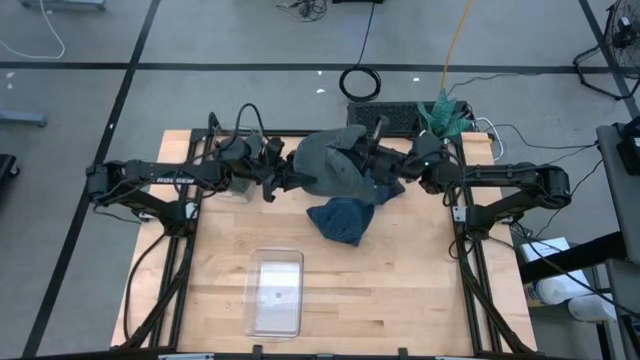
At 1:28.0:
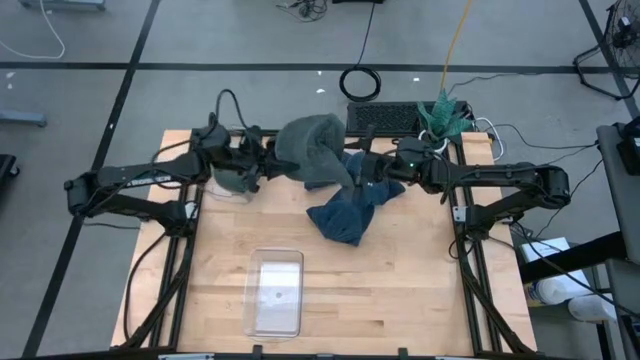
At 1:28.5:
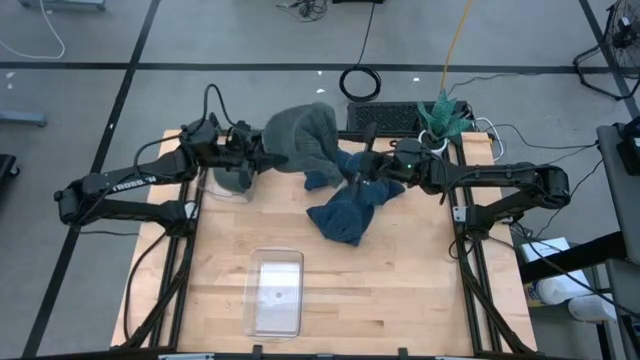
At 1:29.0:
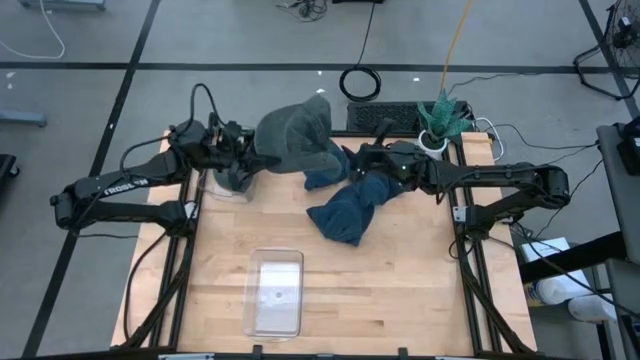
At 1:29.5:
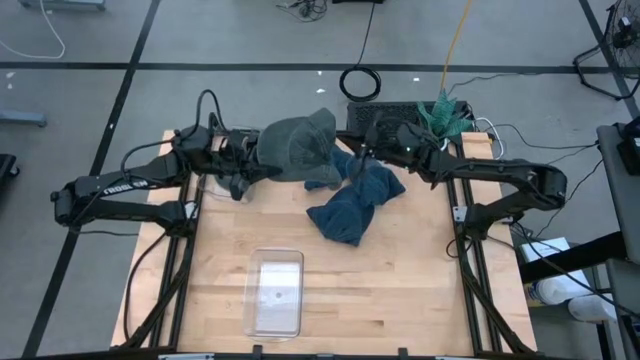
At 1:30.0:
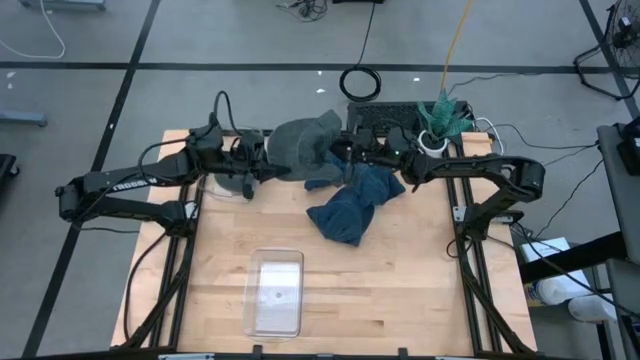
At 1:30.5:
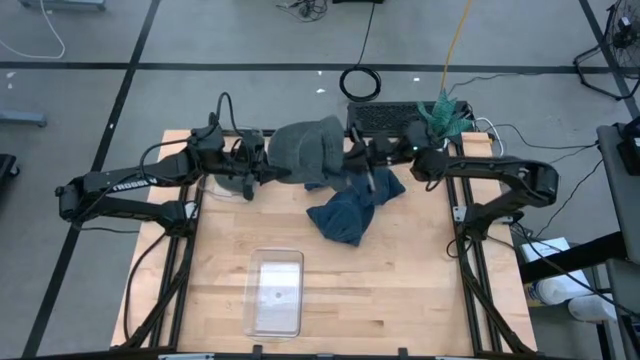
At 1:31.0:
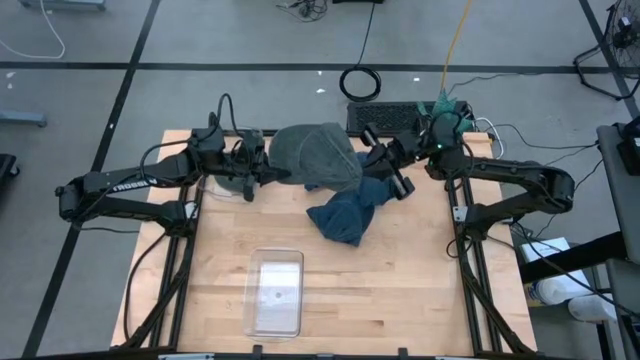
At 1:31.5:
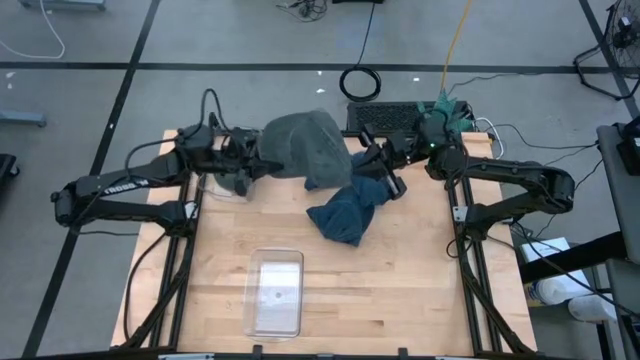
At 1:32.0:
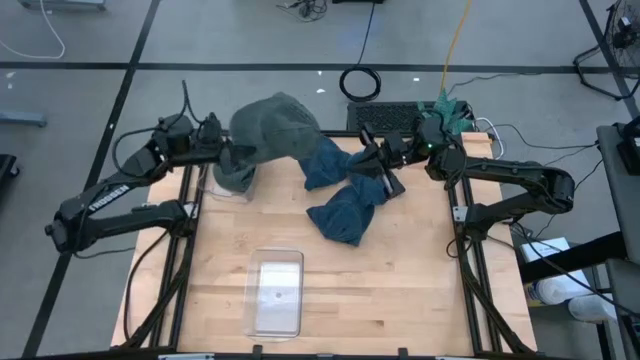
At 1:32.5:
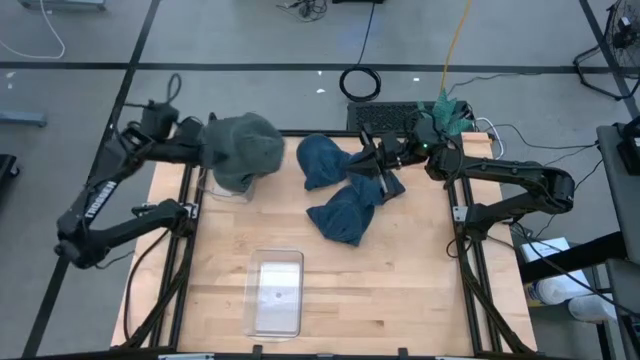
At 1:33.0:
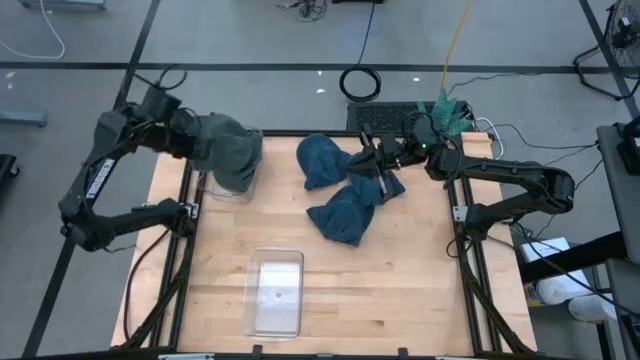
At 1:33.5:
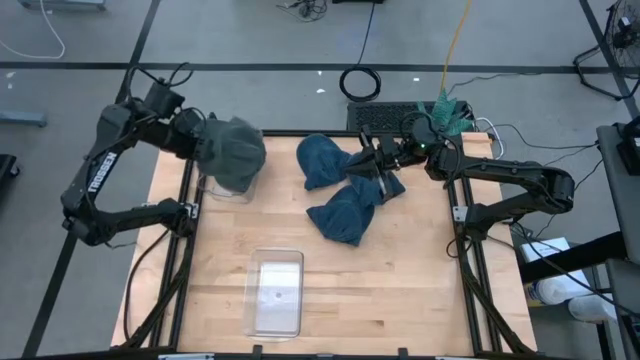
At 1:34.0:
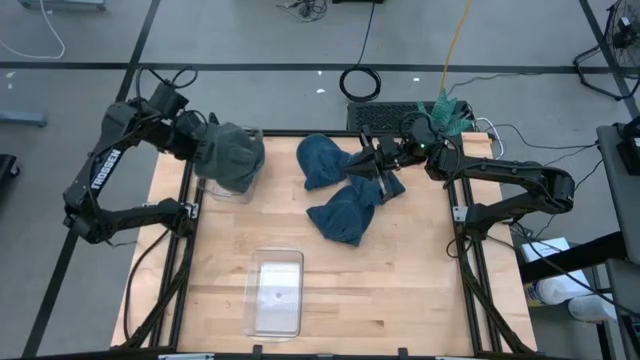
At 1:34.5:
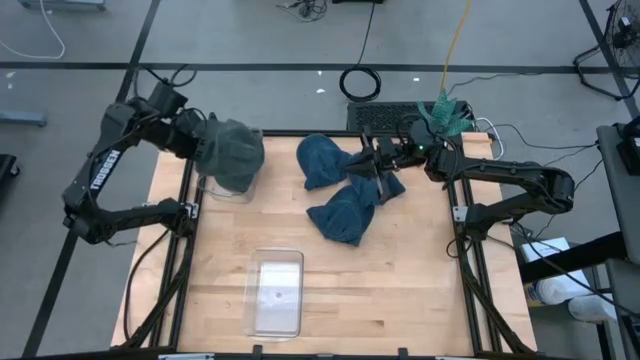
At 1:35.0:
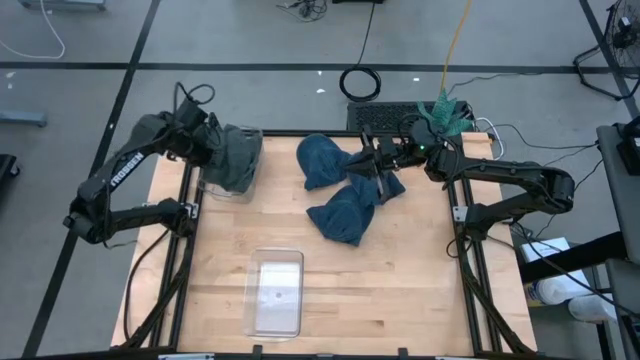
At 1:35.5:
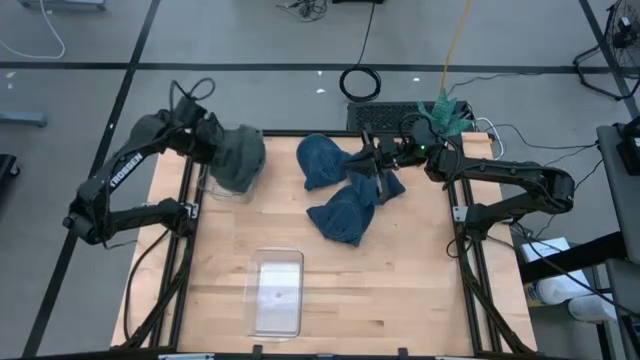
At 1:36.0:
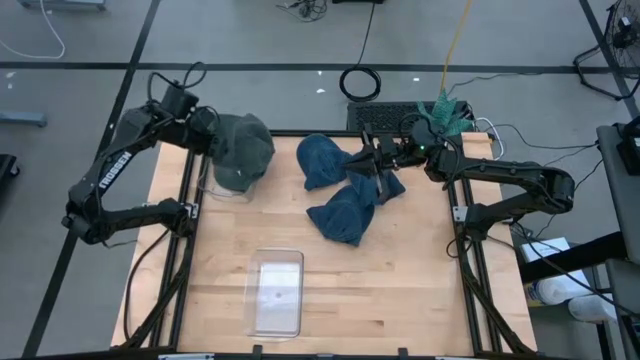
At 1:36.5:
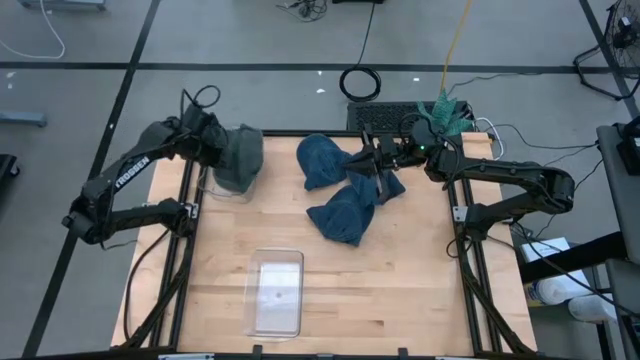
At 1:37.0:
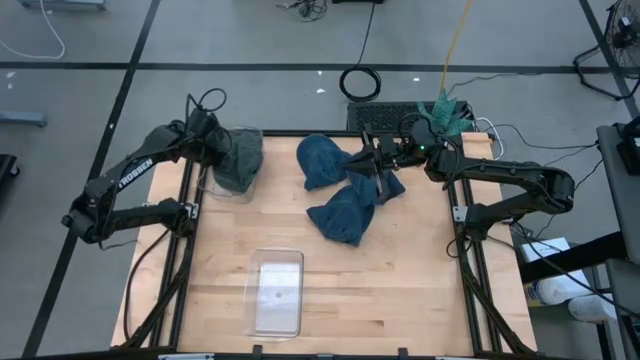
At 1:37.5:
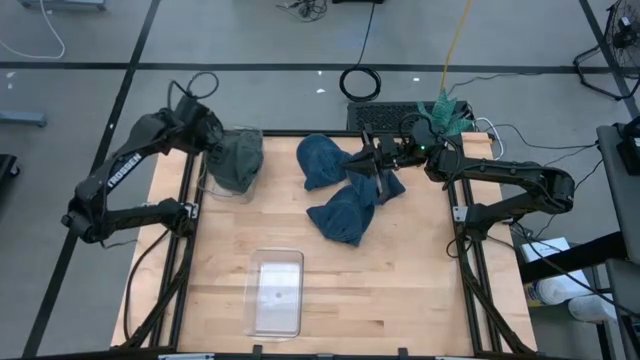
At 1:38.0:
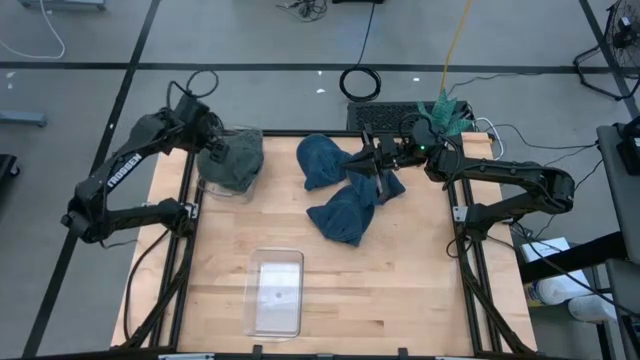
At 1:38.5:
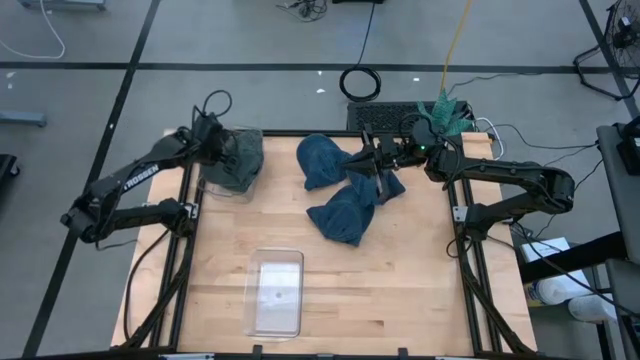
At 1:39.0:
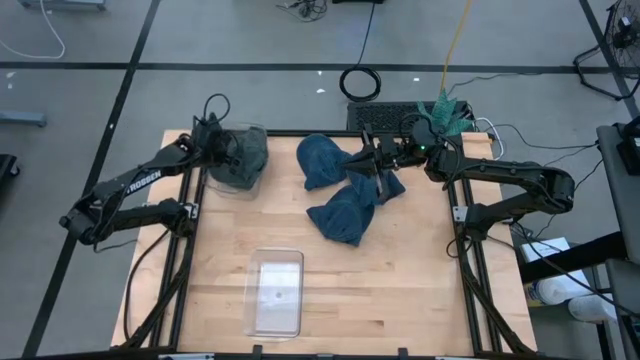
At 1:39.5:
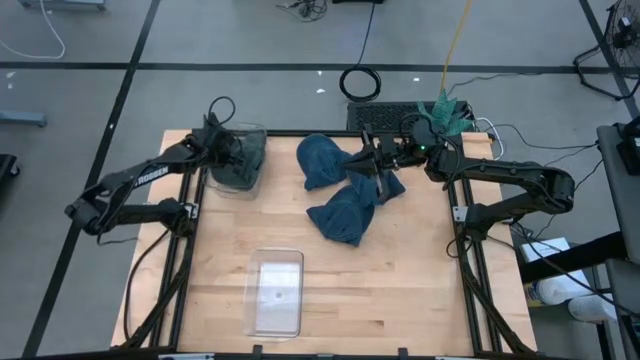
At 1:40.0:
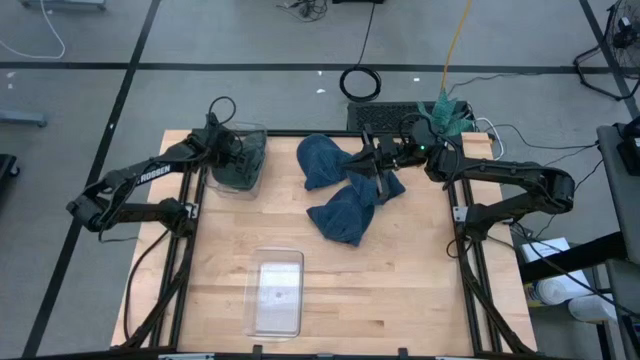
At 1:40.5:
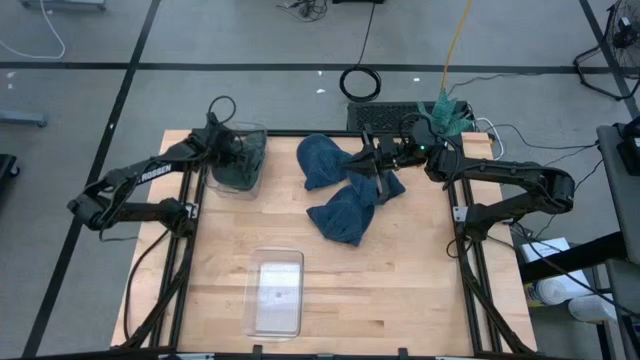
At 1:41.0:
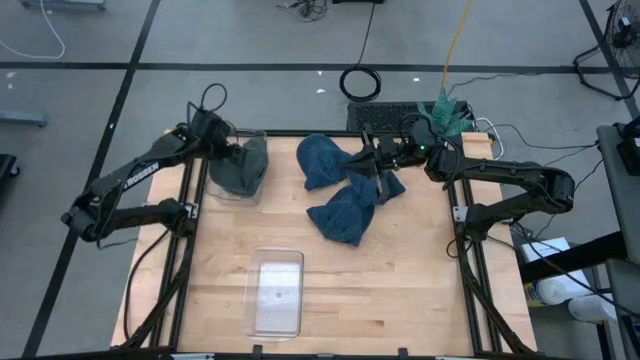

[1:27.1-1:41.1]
Task: Pick & Place hat
Put the green cap into the top transparent bin

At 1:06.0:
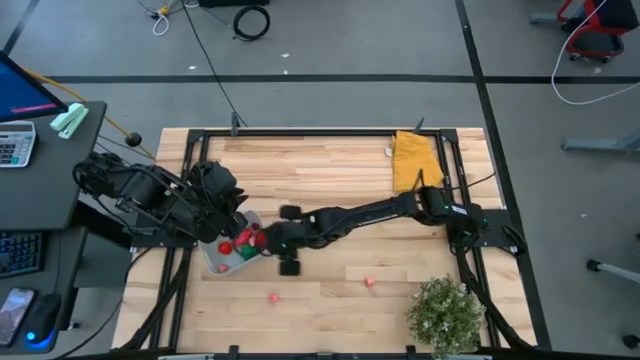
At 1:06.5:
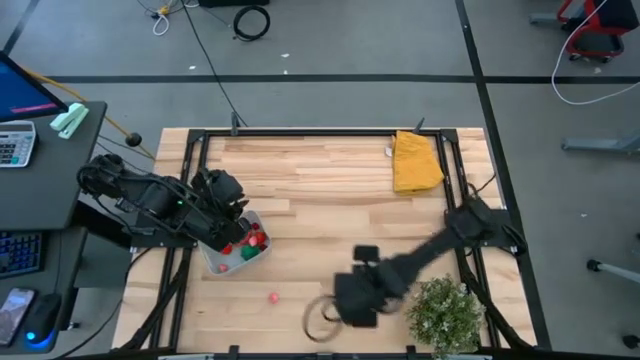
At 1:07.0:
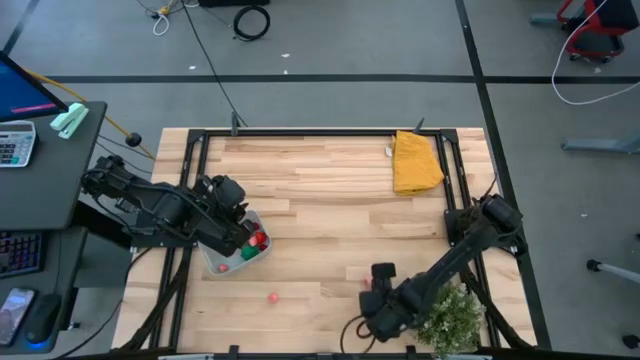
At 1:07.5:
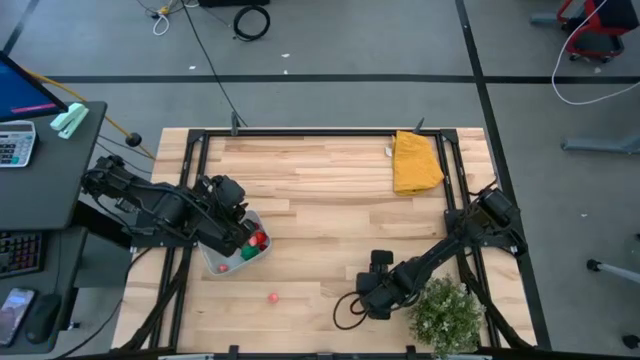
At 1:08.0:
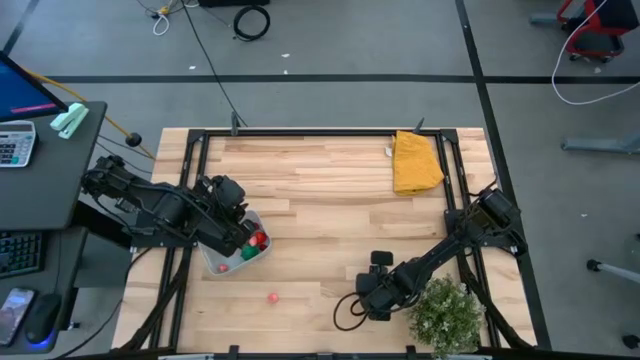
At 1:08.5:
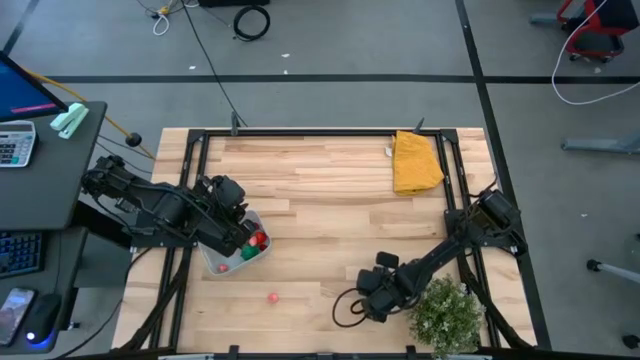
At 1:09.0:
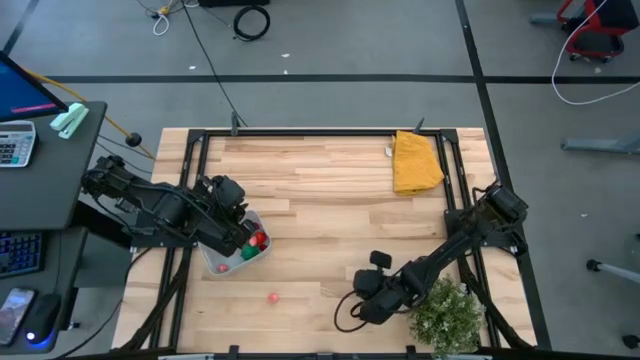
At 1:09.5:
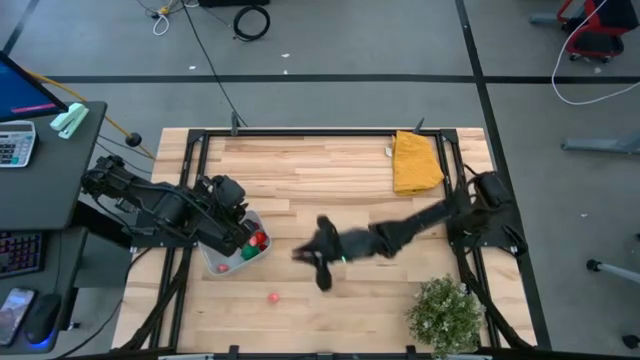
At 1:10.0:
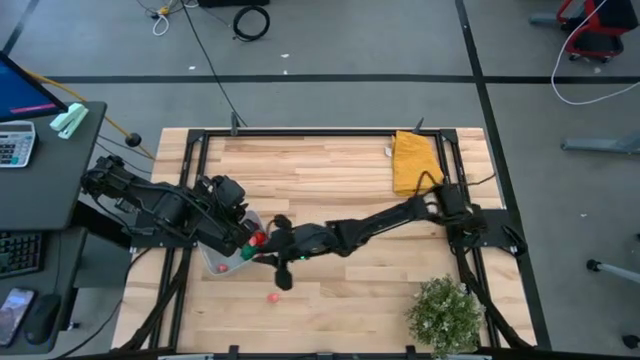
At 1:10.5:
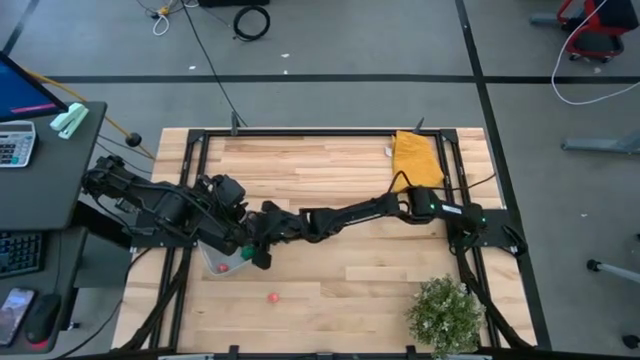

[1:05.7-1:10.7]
Task: Pick and placing Produce into tupperware
Put the right pink apricot into the gray bin
